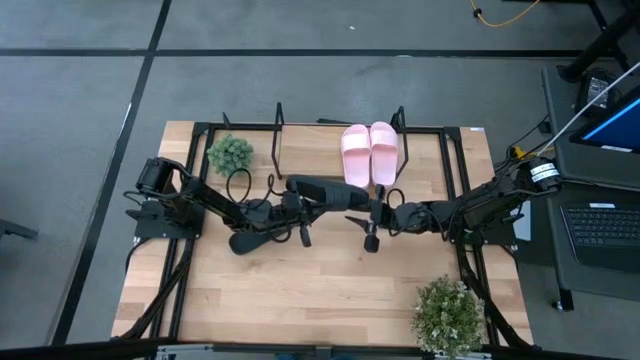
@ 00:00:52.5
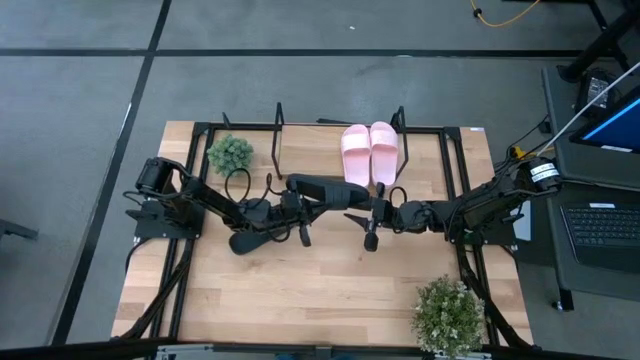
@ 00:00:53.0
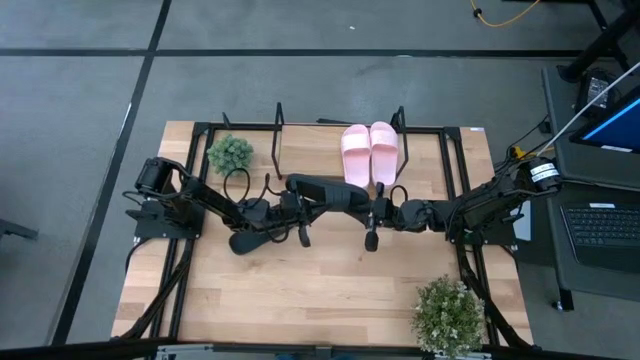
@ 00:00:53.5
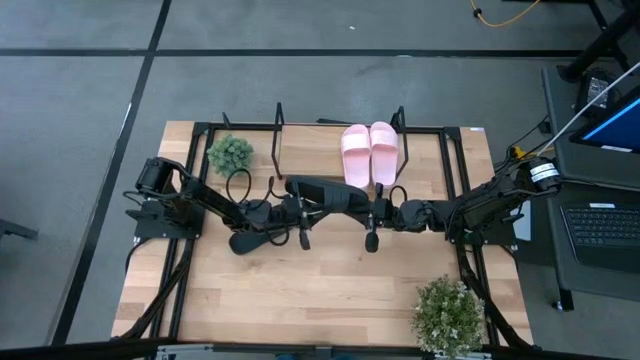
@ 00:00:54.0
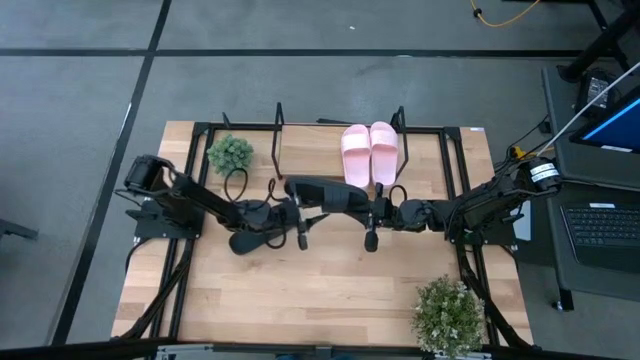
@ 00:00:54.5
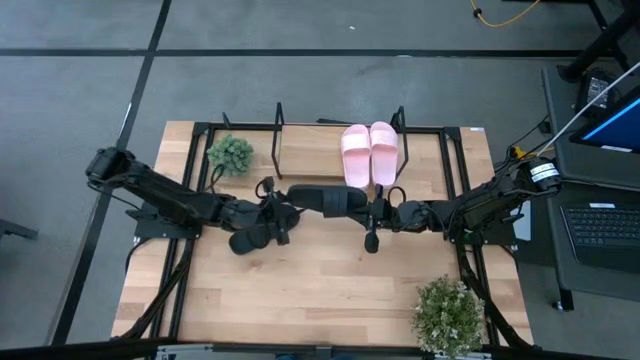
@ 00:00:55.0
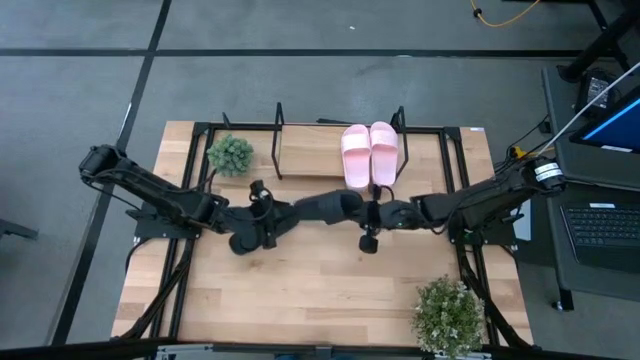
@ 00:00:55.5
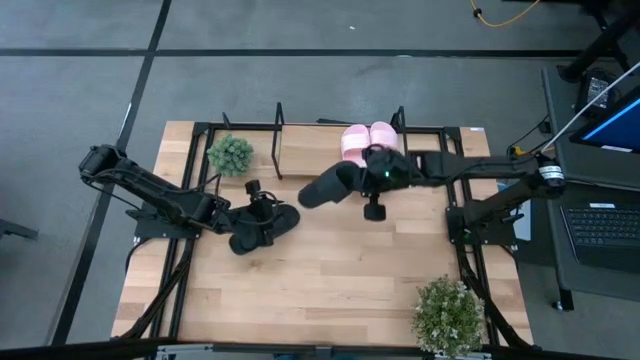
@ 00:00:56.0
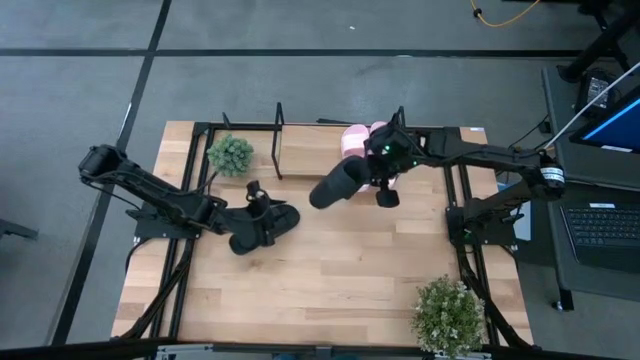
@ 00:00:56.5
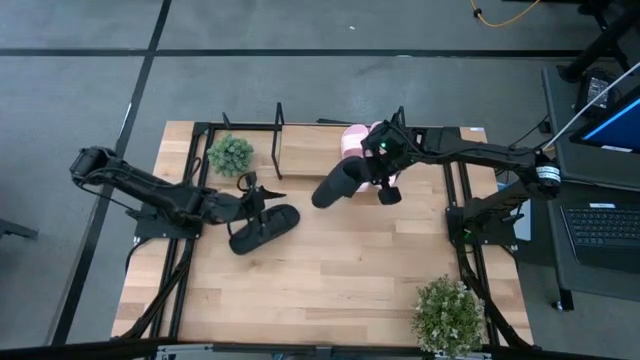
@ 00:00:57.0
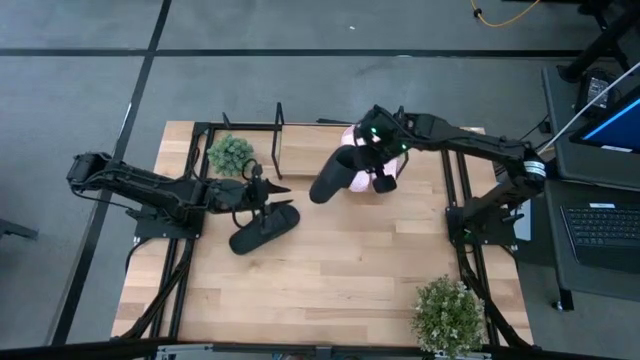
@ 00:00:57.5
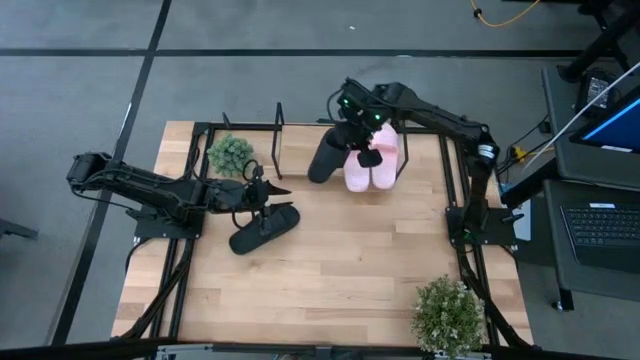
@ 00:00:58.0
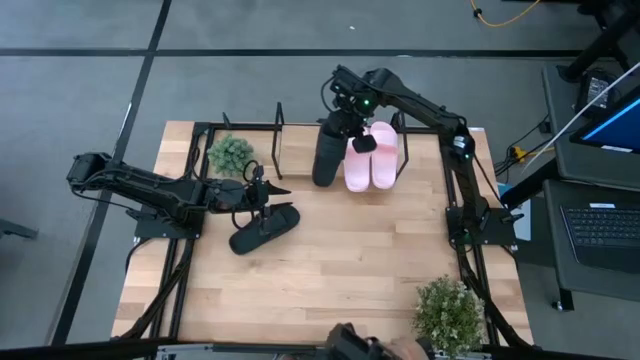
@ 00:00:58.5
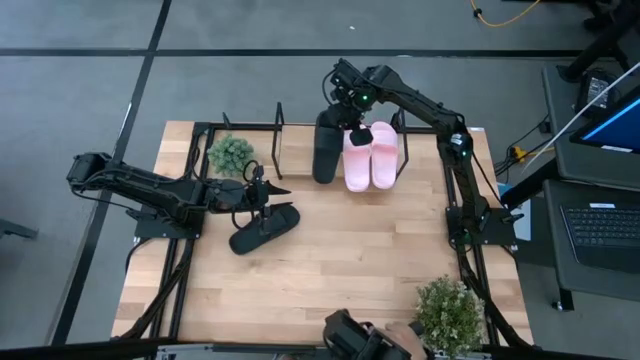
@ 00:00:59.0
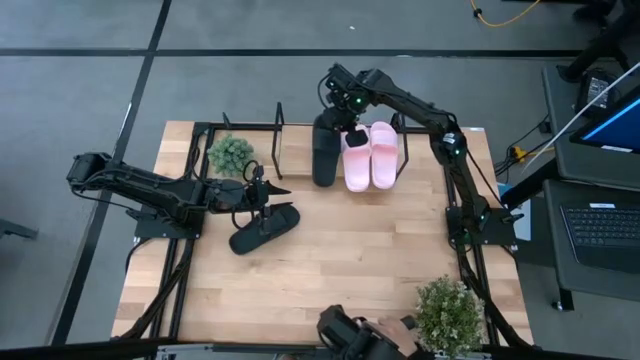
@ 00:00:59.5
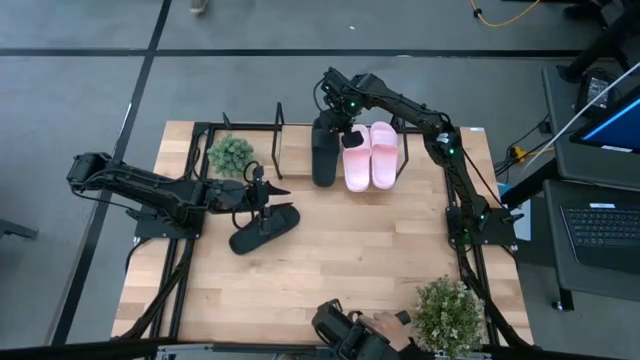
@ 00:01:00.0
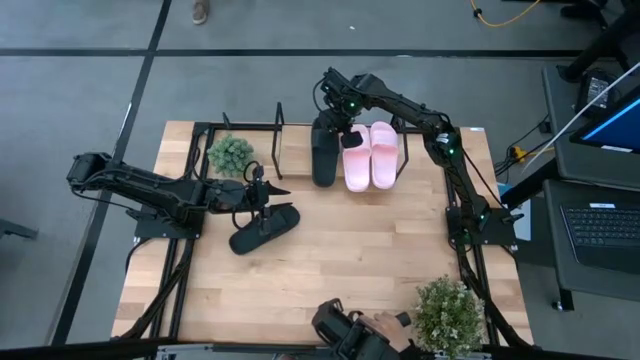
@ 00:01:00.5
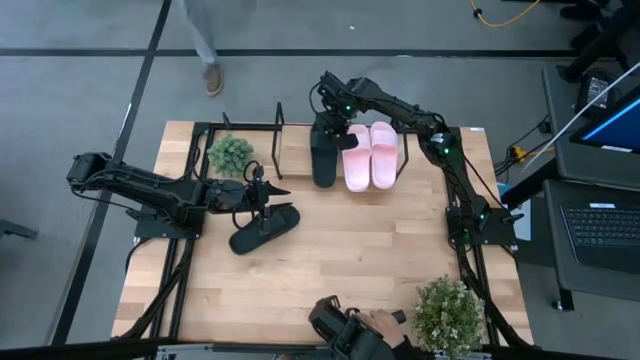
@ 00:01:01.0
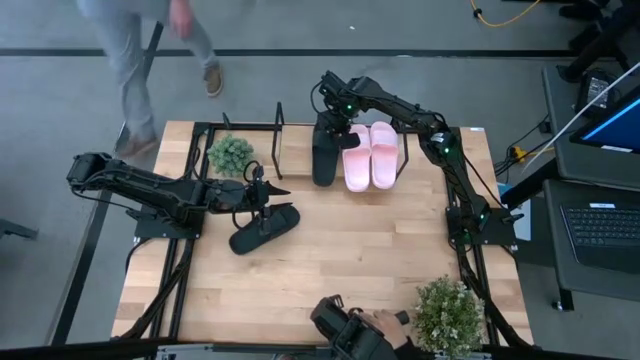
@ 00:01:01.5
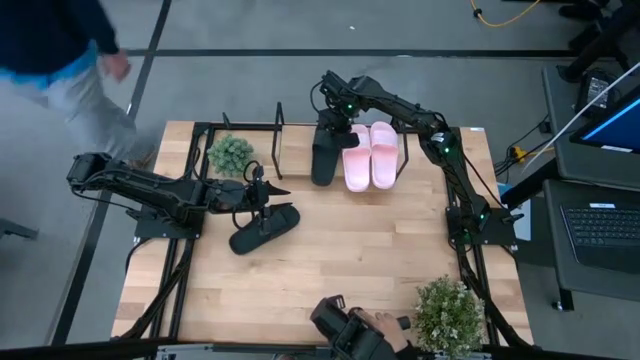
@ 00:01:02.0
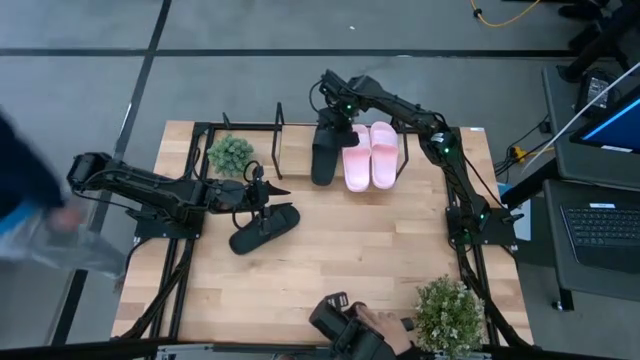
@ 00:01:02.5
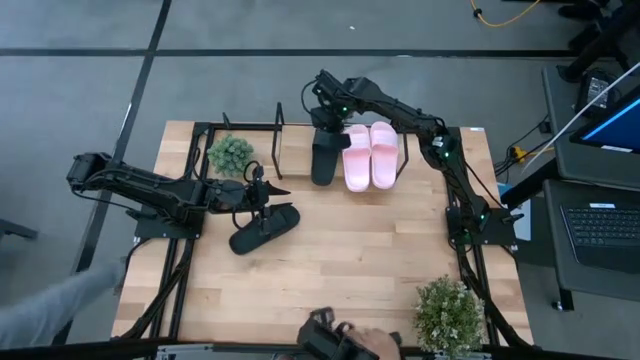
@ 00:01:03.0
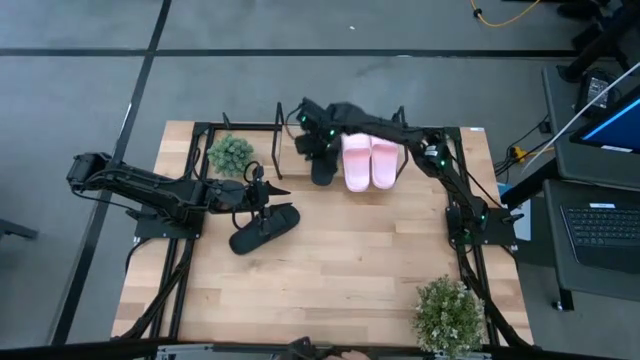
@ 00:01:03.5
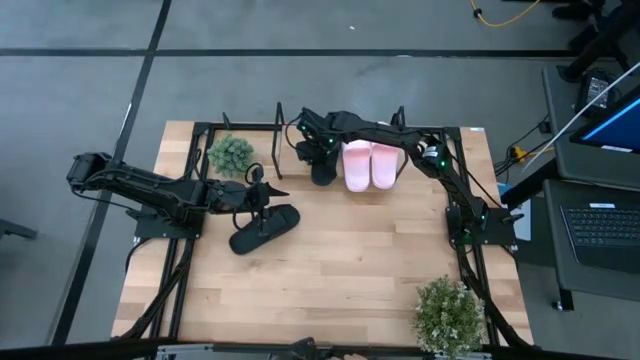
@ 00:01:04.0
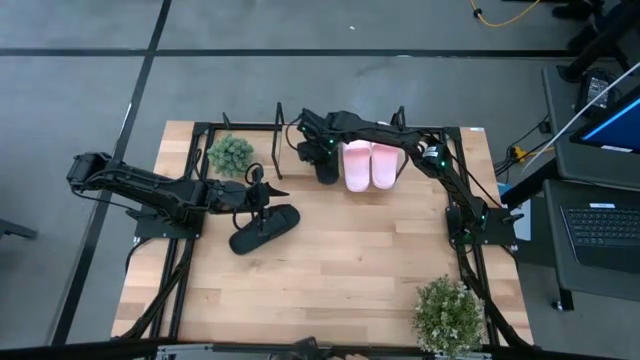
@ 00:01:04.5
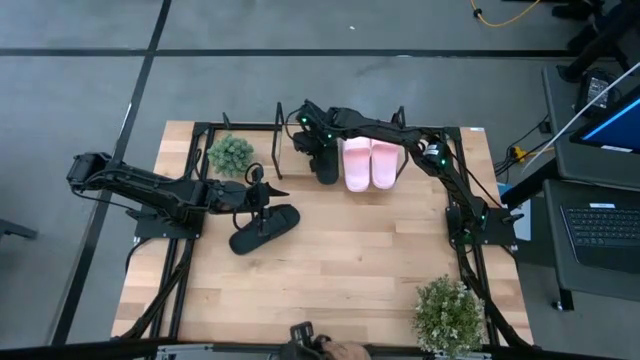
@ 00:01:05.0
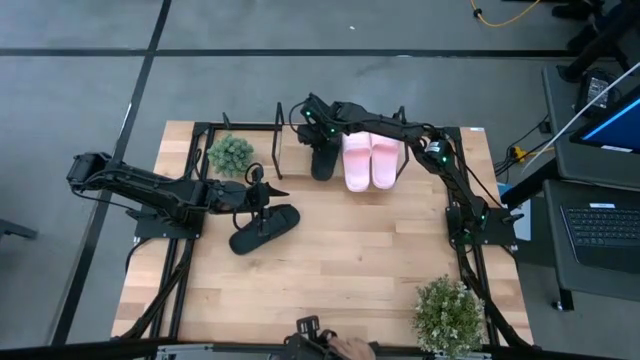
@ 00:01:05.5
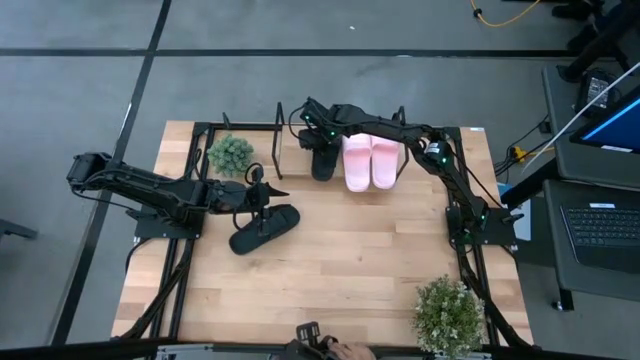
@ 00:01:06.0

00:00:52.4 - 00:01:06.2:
Task: Pick and place slides into the shelf
Put the bottom black slides on the shelf

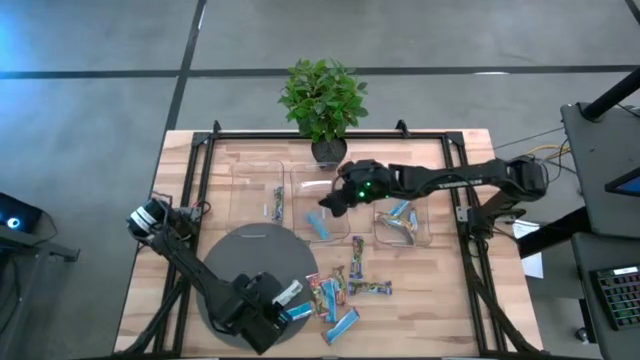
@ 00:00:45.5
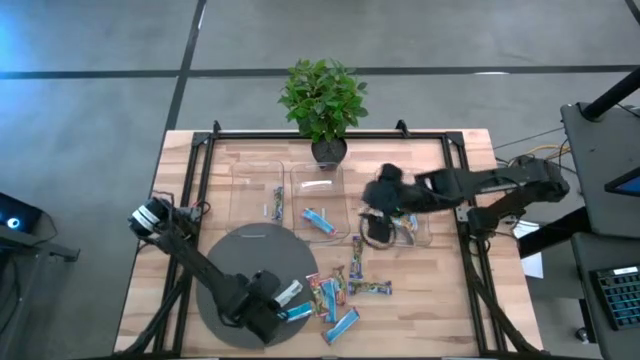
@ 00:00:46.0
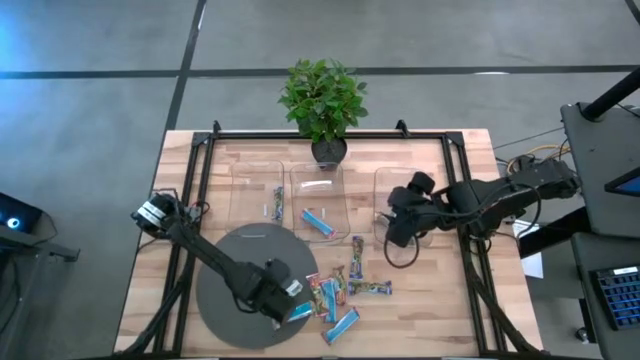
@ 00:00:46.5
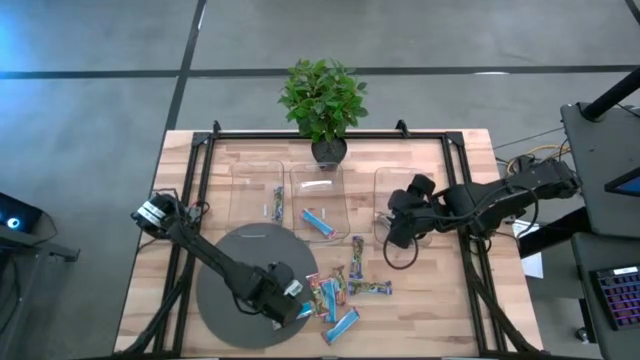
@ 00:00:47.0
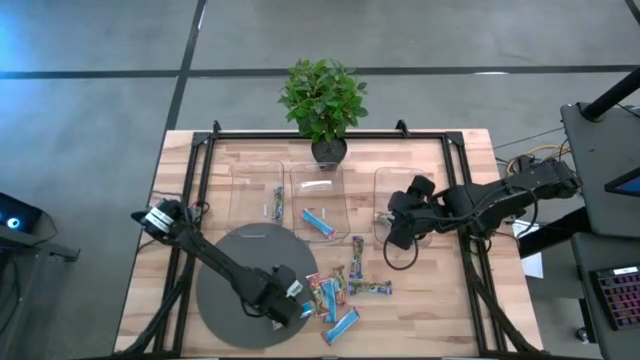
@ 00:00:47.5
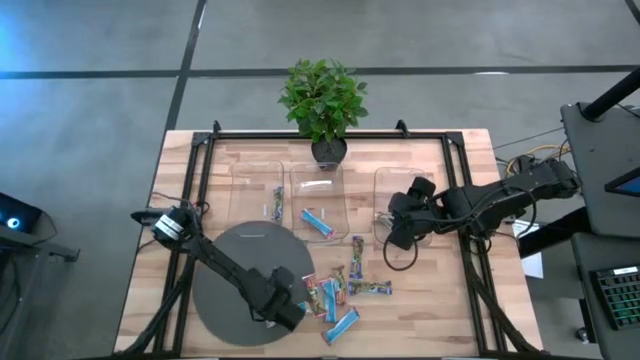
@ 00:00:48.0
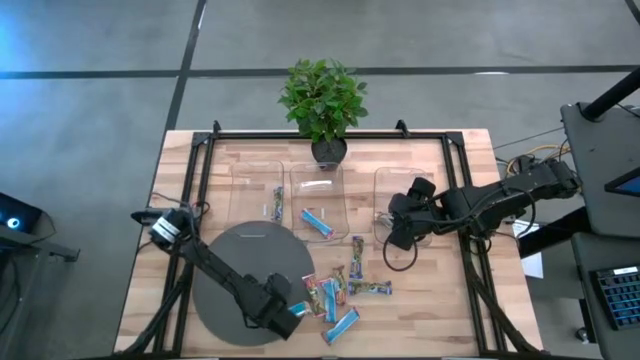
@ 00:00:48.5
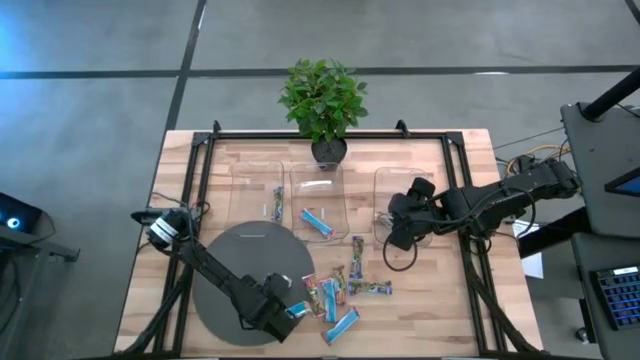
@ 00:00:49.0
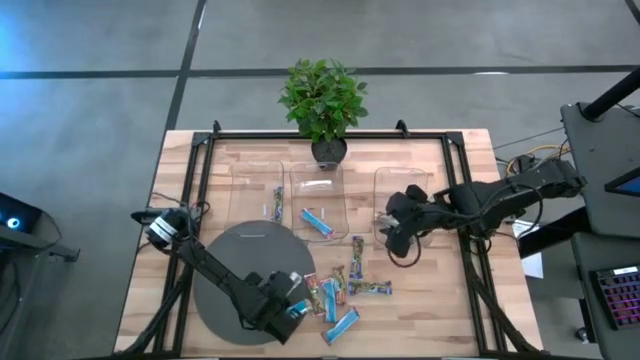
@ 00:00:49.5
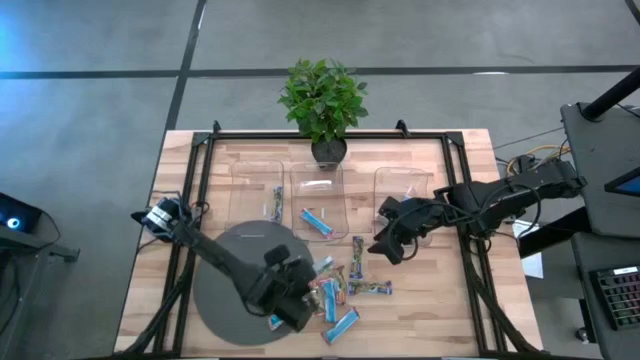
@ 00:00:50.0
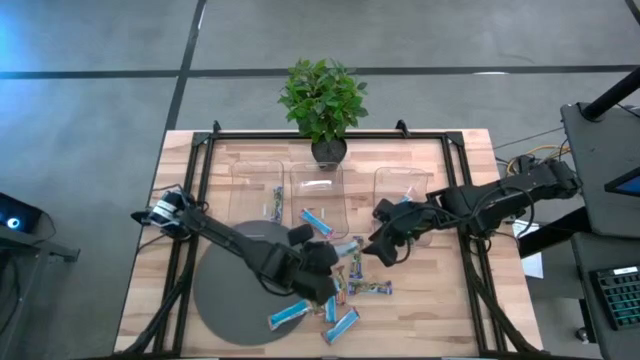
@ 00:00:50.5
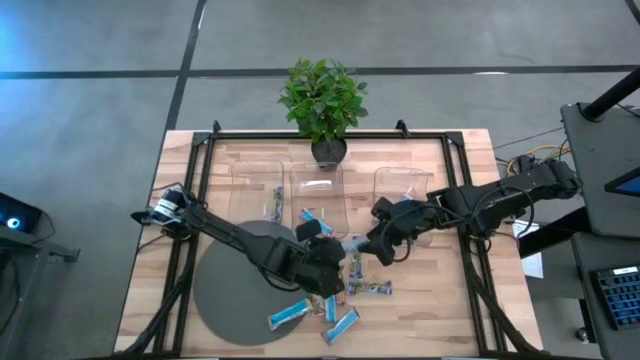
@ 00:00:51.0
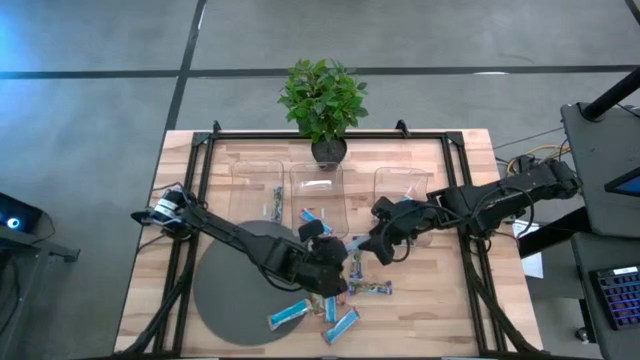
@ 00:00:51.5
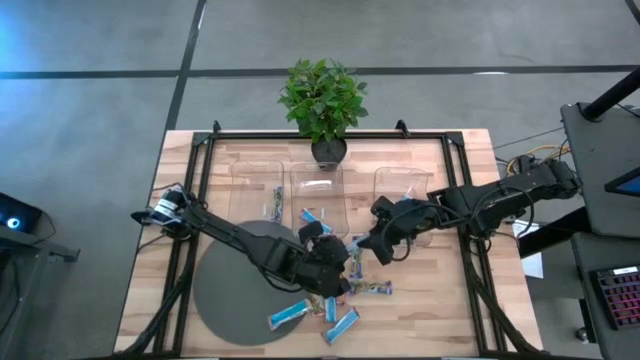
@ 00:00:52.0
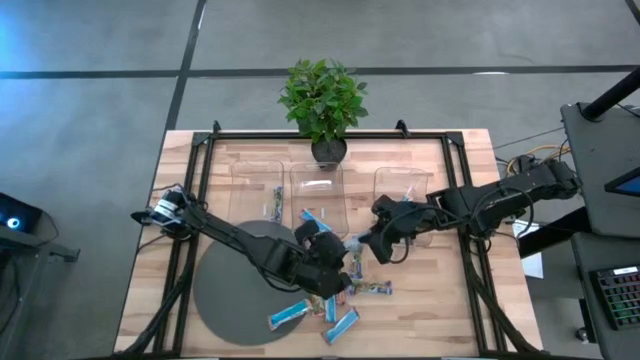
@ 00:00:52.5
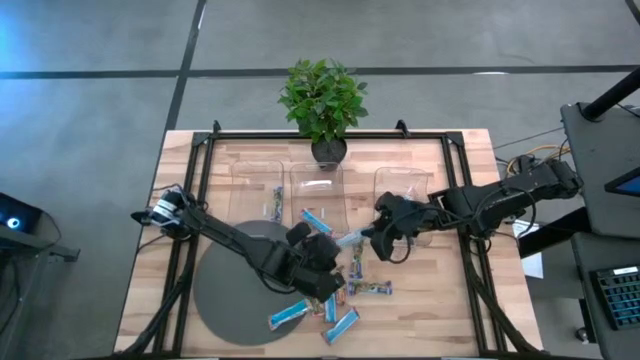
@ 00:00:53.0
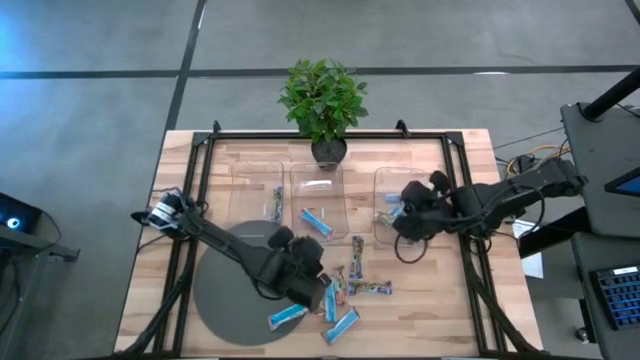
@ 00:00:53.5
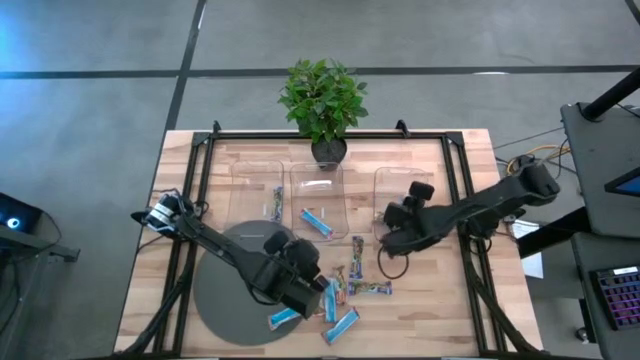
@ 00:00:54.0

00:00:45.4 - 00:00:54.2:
Task: Pick and place Granola Bars by type
Put the yellow granola bar into the right transparent bin
